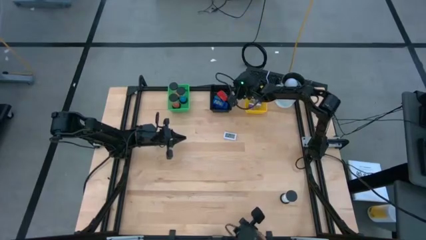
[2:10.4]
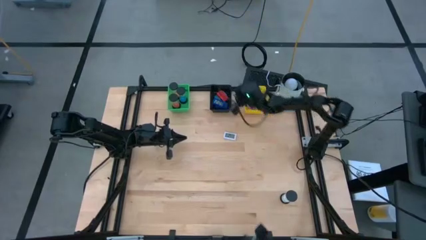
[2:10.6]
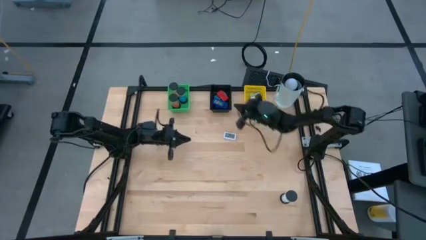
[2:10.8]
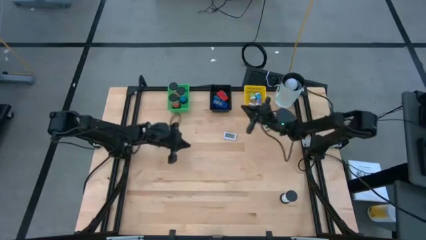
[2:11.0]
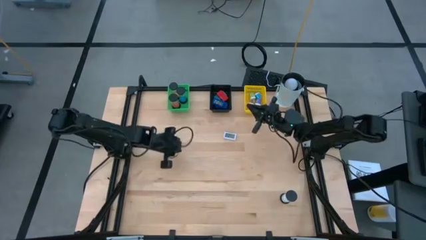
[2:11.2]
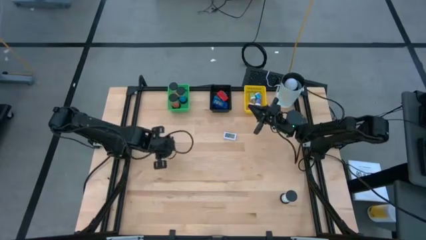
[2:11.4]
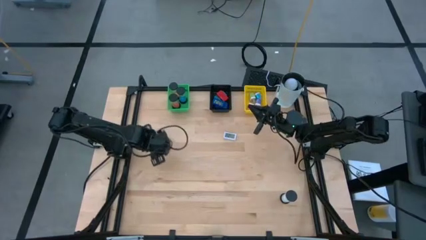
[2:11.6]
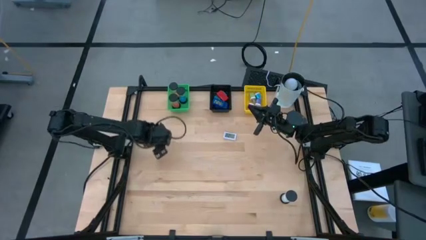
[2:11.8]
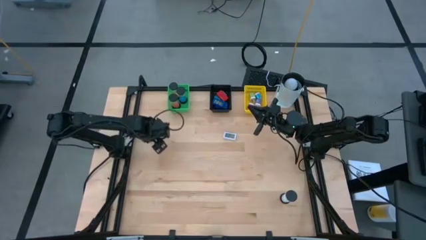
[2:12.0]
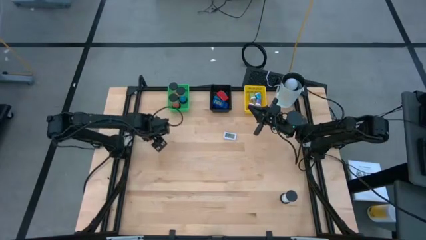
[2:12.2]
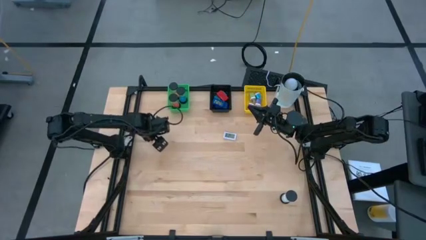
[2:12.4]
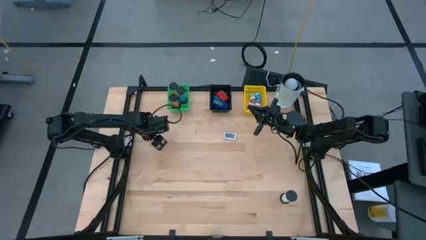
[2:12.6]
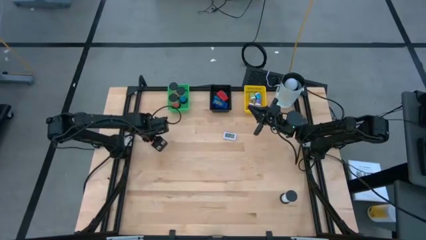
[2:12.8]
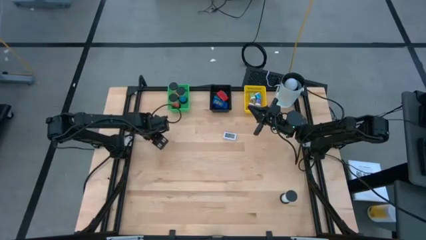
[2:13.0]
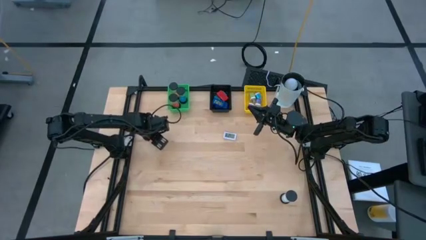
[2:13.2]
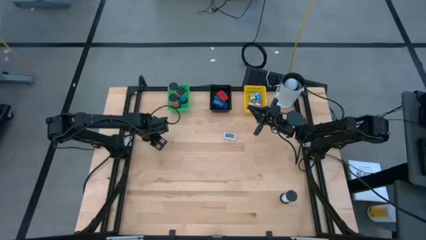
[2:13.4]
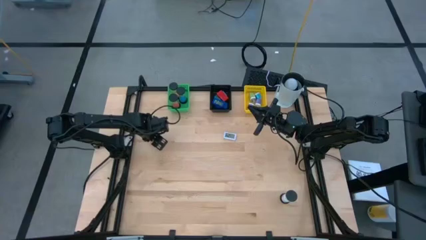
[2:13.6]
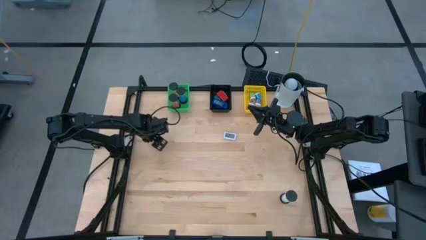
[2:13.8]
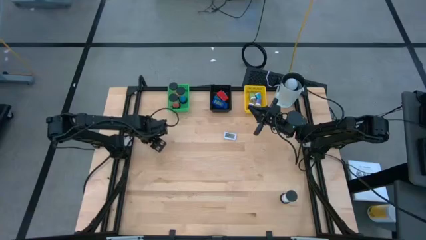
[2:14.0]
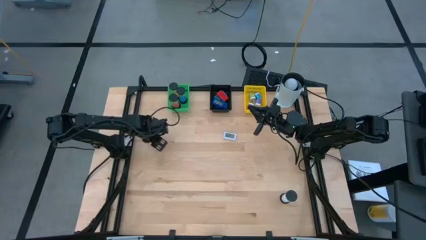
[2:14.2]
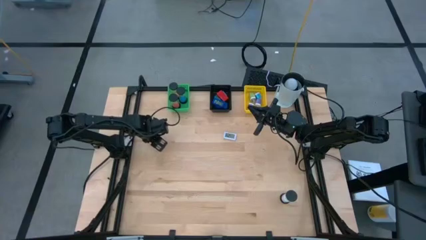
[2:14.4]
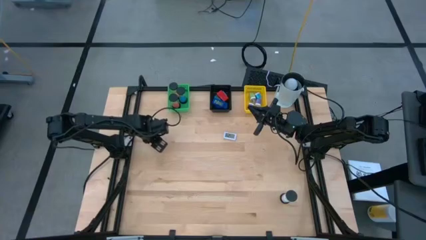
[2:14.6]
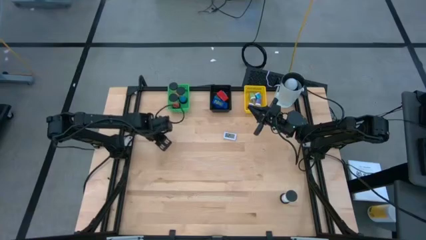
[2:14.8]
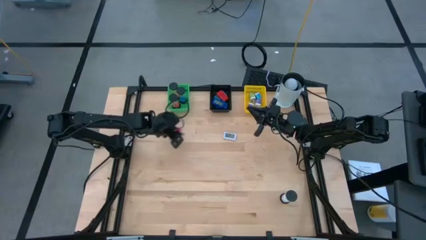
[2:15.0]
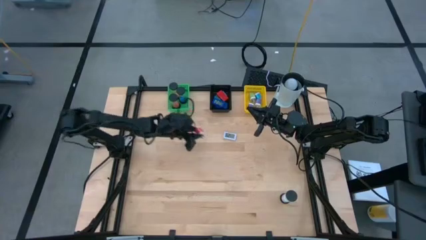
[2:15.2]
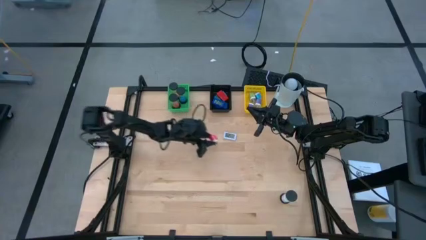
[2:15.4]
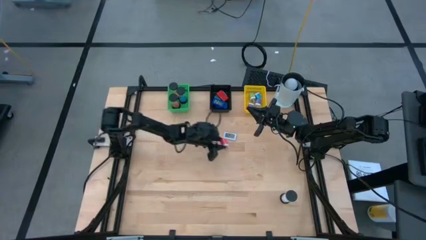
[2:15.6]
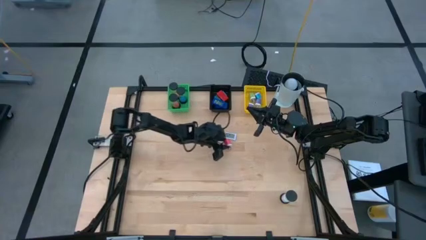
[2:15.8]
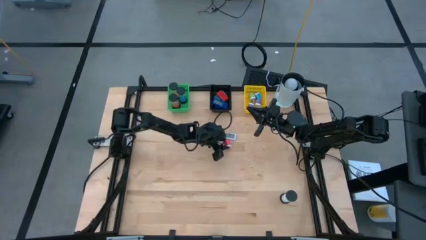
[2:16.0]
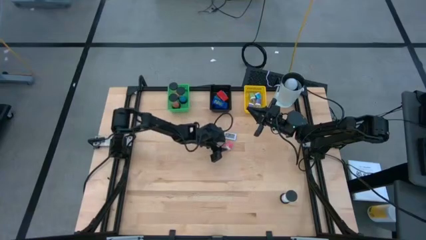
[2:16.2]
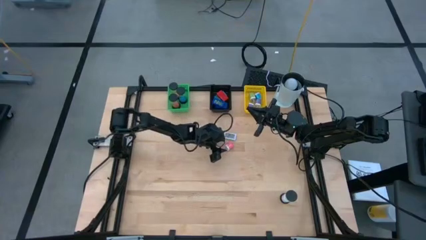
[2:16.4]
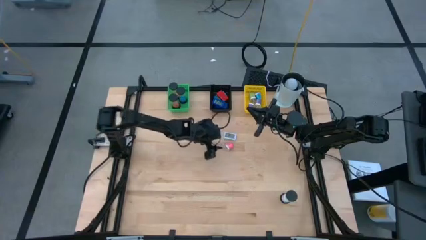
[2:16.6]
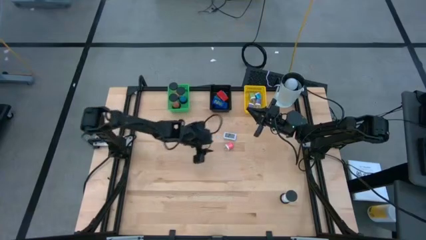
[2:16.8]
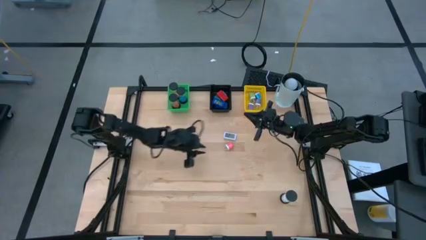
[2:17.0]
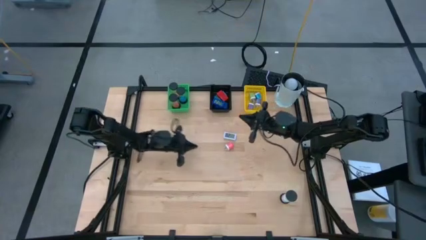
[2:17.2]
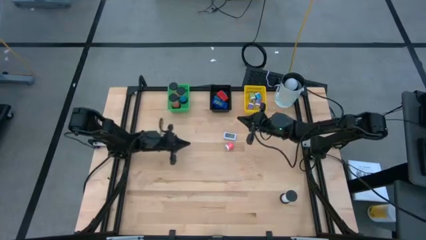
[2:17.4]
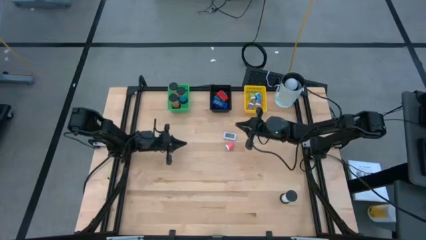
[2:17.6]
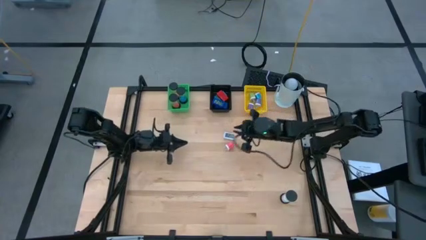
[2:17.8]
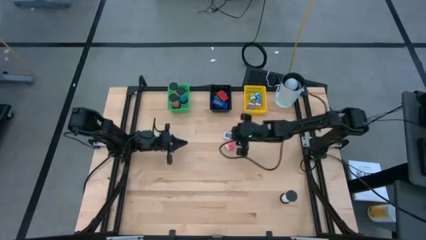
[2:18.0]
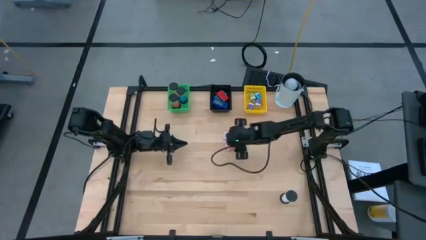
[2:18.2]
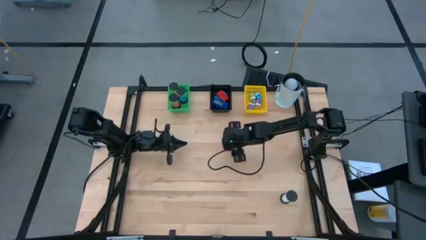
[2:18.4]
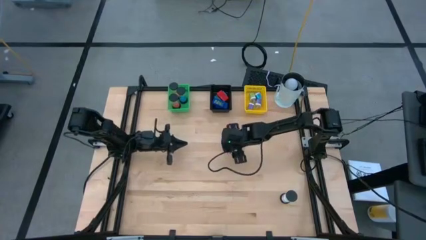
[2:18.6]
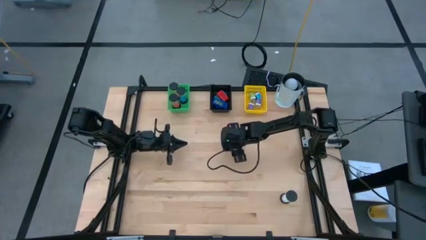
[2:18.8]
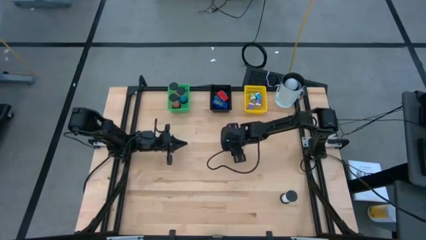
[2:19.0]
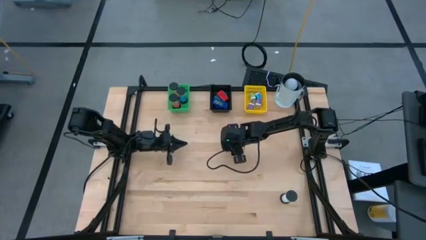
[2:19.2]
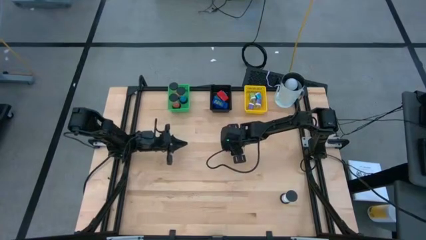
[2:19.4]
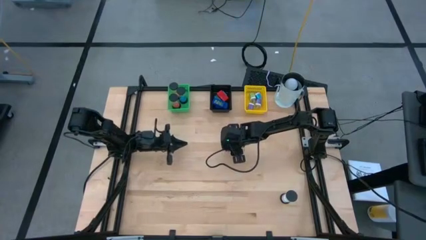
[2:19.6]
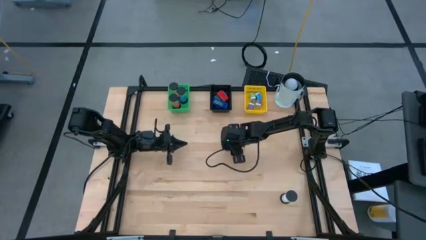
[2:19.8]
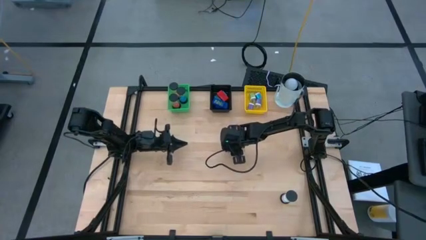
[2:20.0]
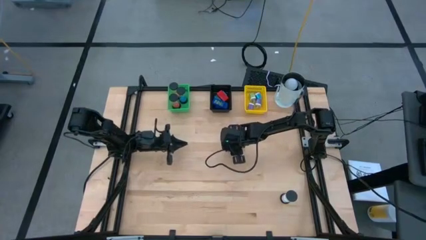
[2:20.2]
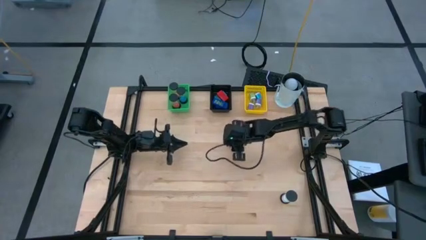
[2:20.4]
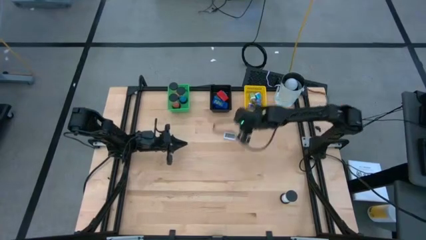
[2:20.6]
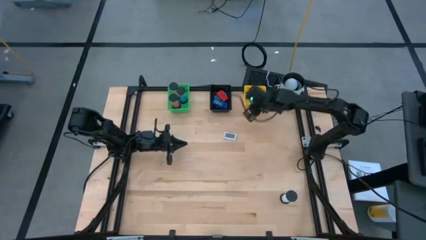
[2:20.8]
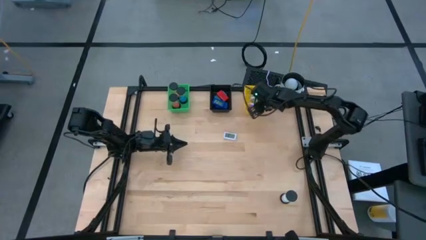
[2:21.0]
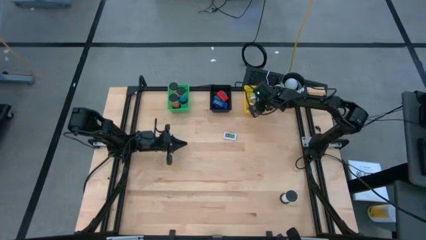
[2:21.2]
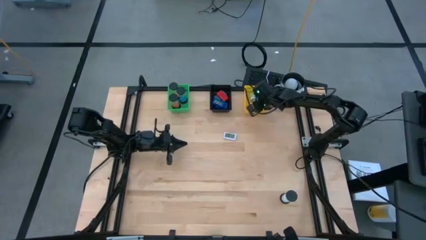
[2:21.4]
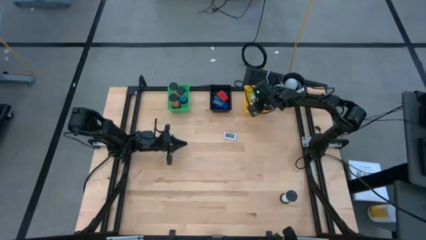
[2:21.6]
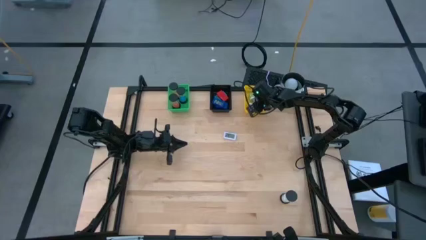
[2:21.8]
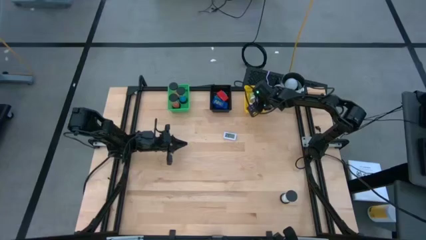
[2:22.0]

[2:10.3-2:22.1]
Task: Pick & Place Office items
Put the pink charger adapter into the yellow bin

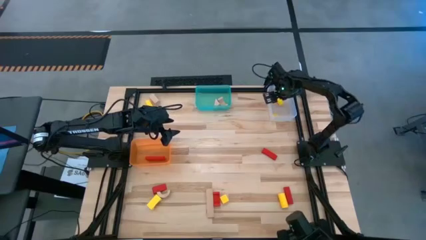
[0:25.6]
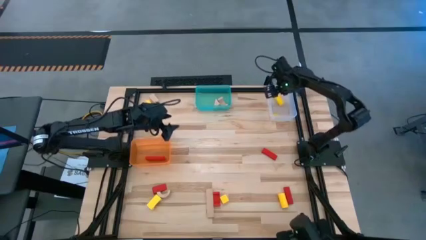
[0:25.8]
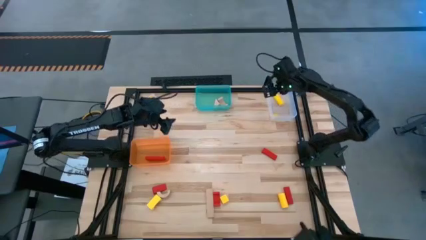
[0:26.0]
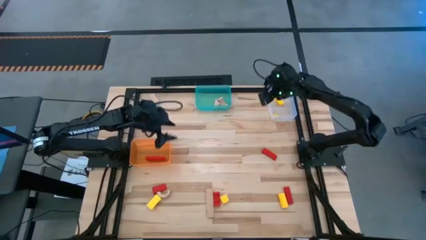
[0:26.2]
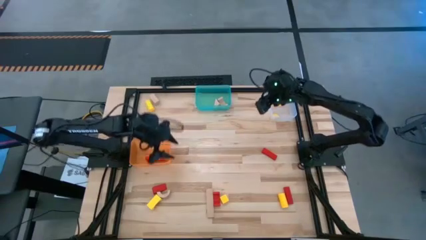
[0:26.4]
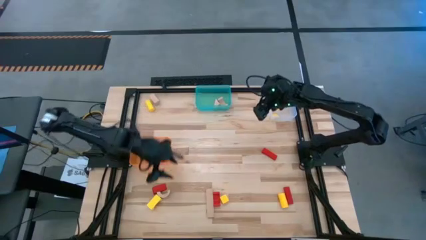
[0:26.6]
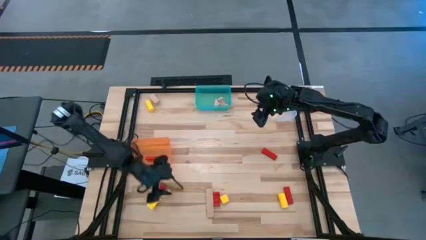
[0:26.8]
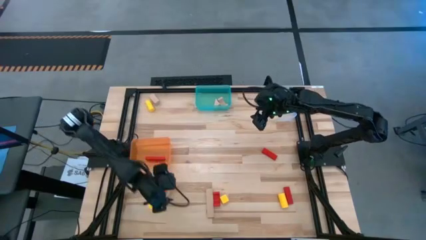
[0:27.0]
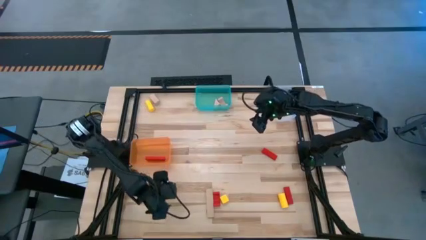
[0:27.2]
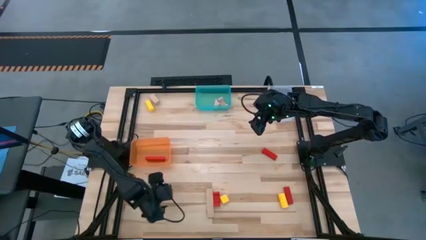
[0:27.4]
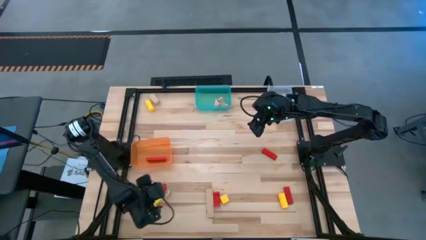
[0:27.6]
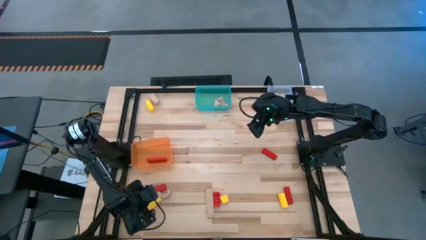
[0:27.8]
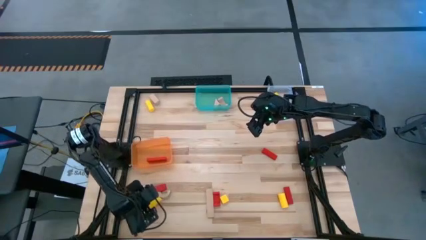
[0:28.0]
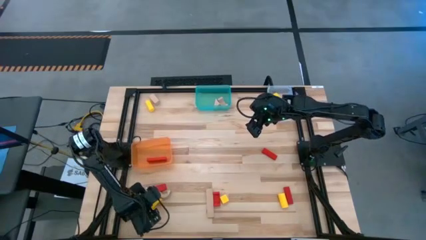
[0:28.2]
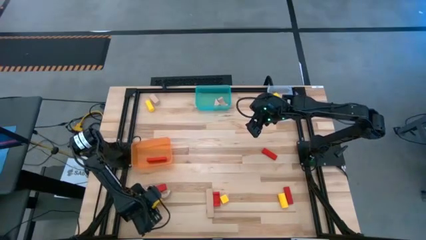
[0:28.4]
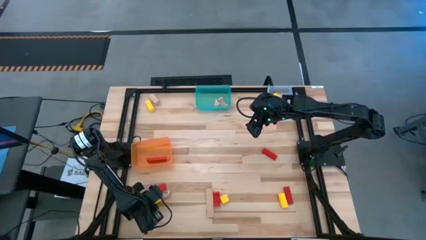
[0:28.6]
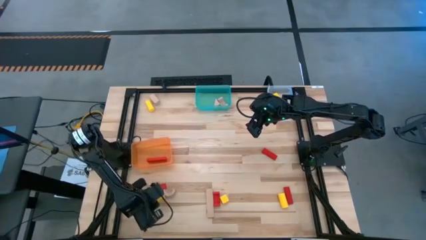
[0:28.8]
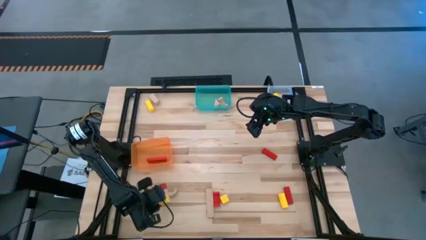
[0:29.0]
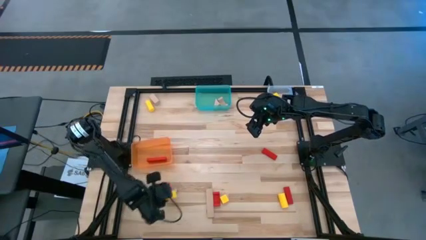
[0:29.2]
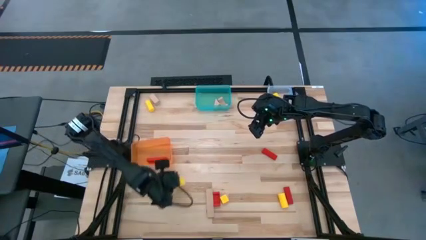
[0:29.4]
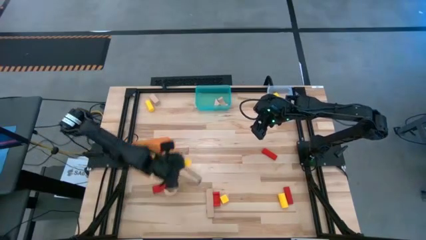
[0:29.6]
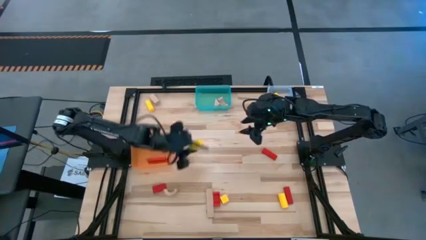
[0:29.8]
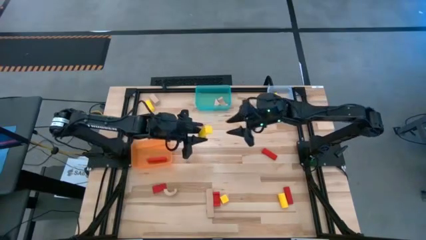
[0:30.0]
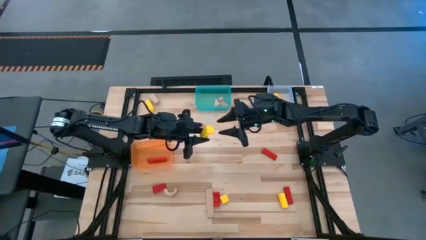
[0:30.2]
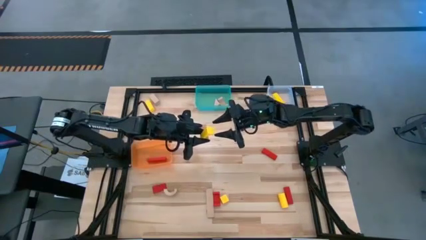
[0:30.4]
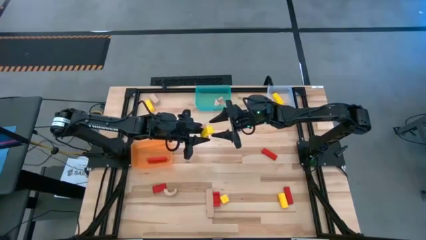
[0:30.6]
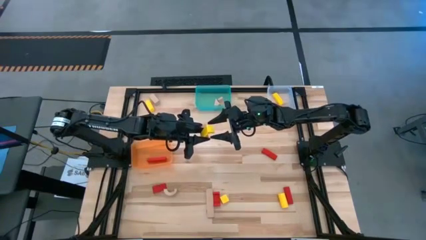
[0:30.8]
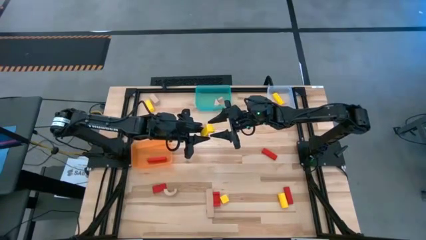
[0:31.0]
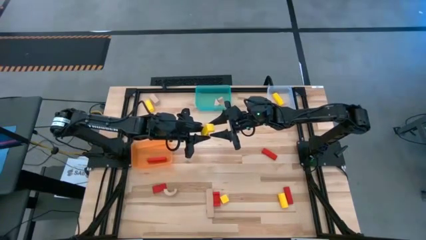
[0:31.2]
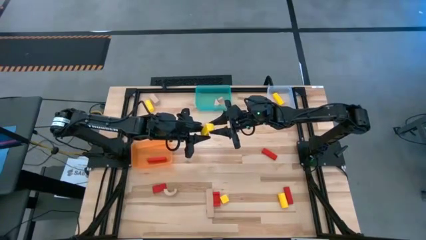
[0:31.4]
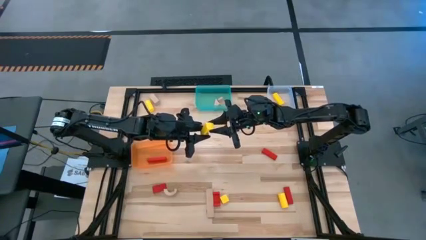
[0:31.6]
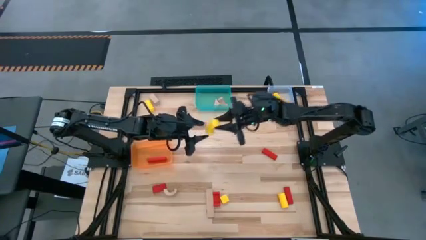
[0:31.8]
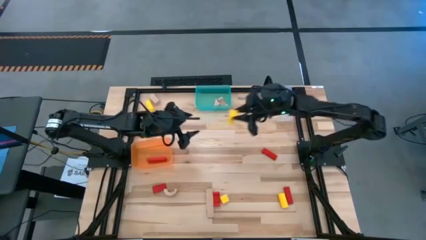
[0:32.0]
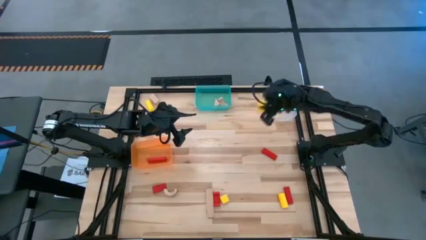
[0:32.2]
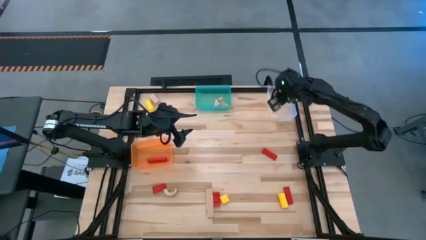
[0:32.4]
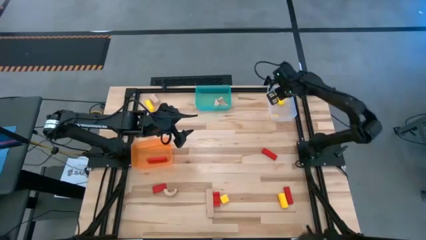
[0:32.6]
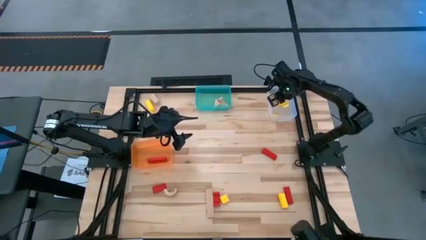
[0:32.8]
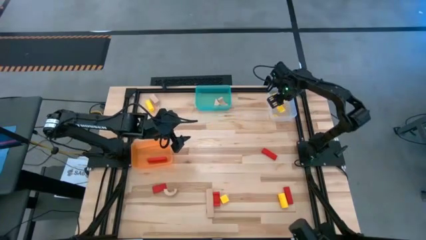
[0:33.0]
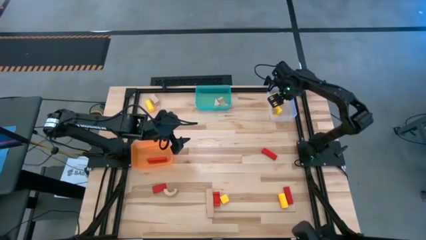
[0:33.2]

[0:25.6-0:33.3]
Task: Sort & place blocks by color
Put the yellow block into the transparent white bin
